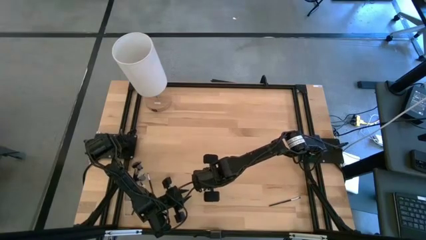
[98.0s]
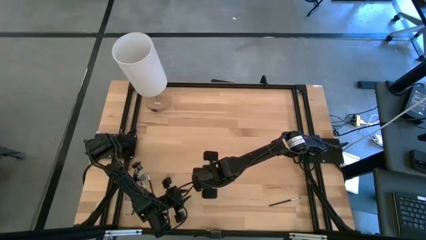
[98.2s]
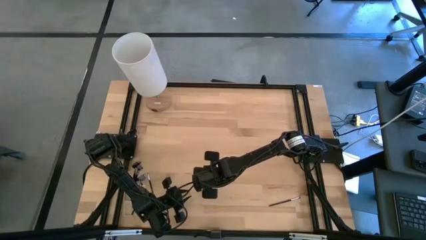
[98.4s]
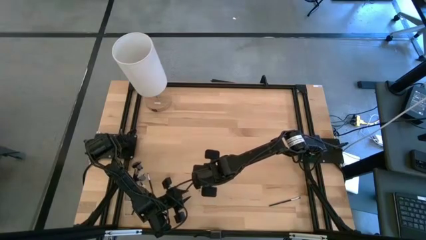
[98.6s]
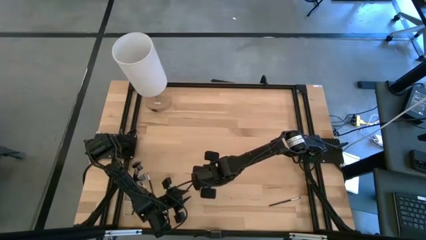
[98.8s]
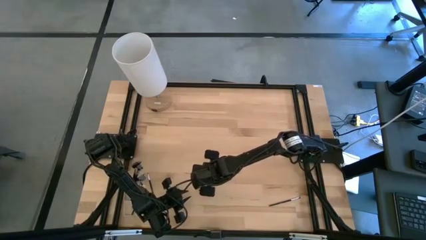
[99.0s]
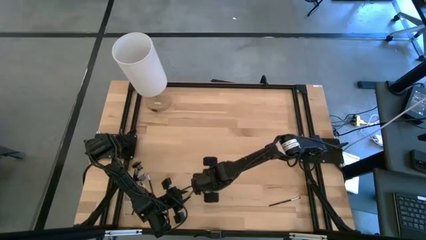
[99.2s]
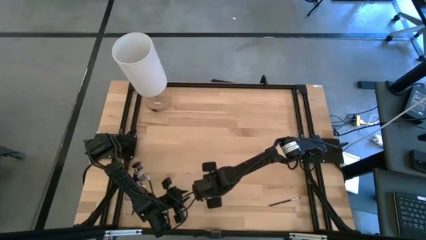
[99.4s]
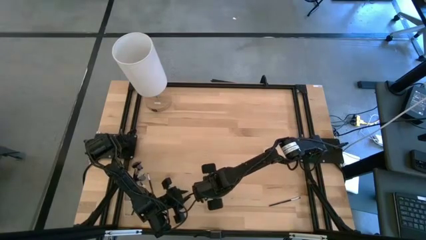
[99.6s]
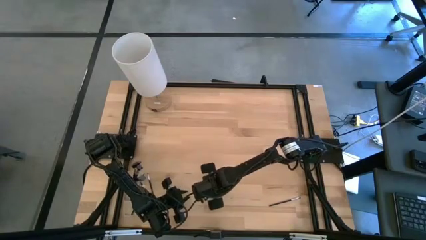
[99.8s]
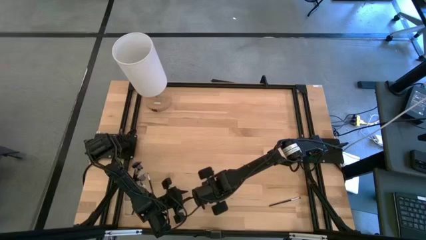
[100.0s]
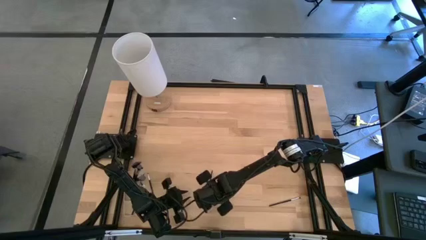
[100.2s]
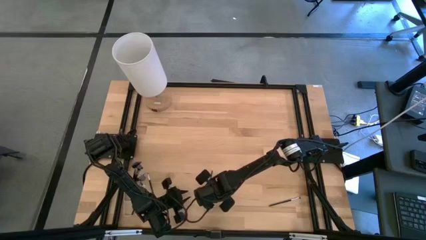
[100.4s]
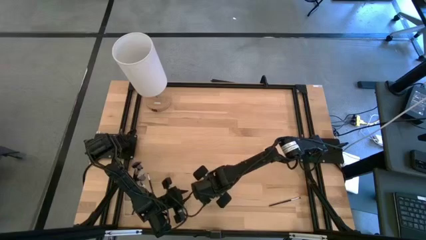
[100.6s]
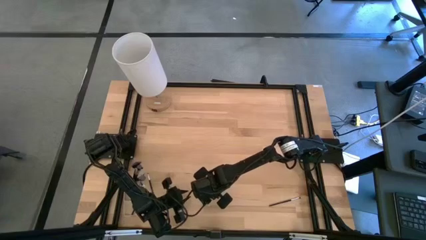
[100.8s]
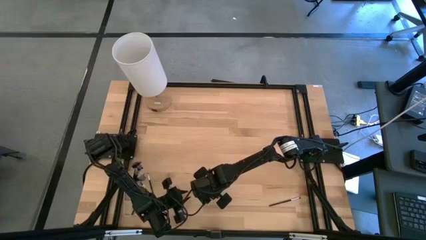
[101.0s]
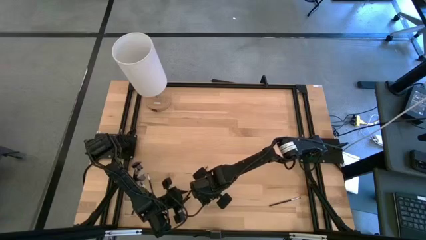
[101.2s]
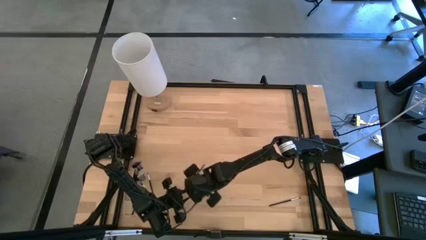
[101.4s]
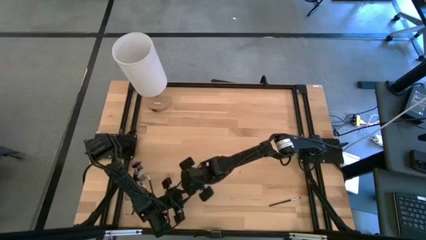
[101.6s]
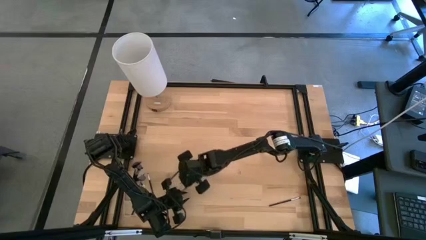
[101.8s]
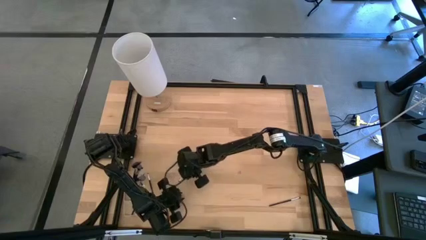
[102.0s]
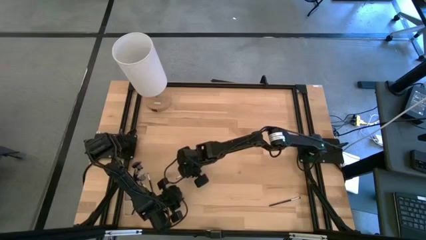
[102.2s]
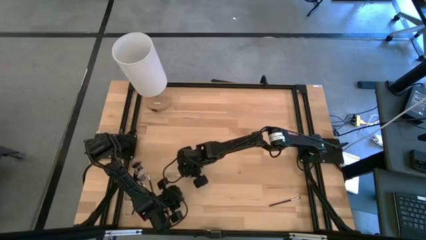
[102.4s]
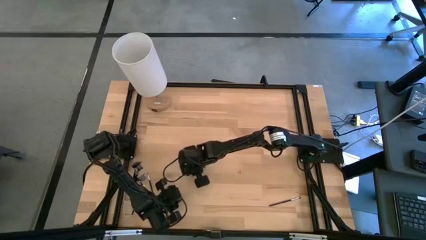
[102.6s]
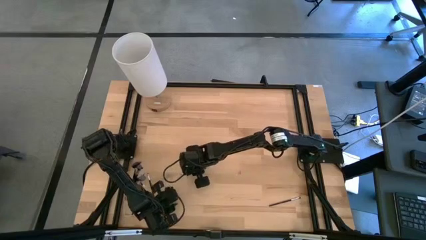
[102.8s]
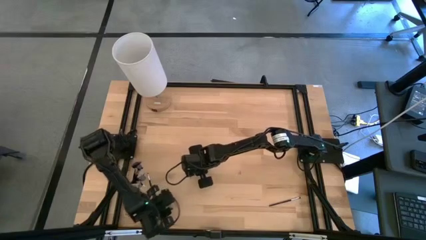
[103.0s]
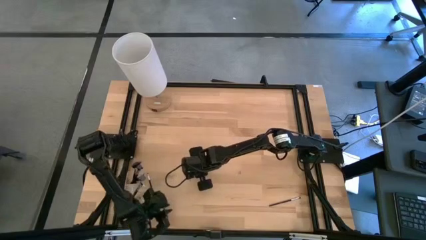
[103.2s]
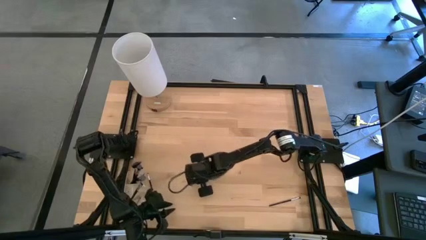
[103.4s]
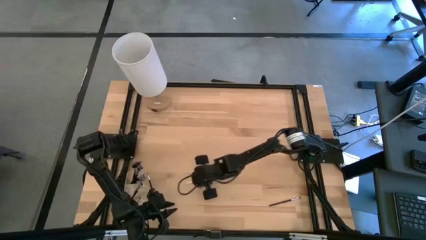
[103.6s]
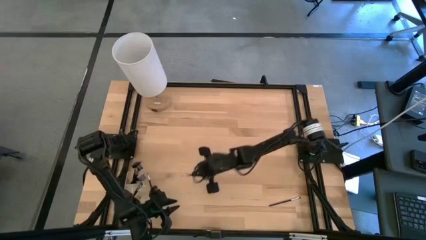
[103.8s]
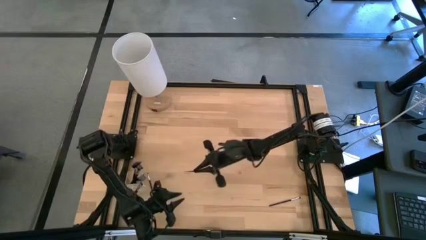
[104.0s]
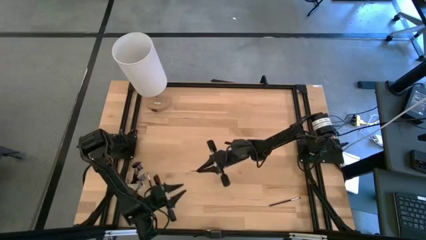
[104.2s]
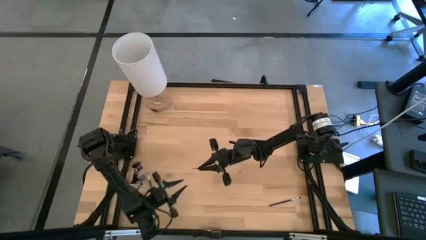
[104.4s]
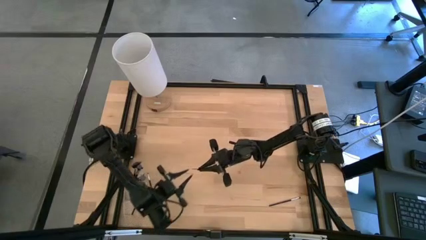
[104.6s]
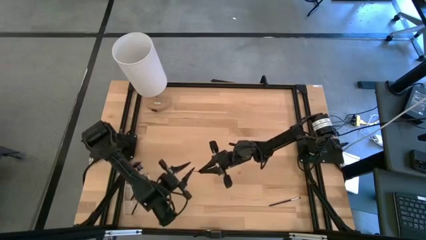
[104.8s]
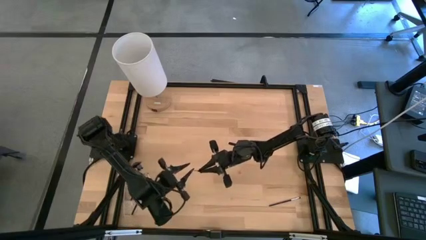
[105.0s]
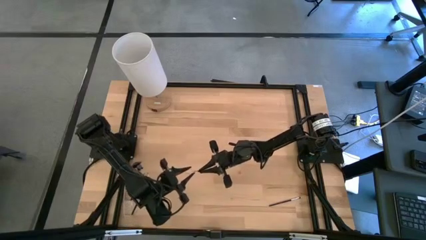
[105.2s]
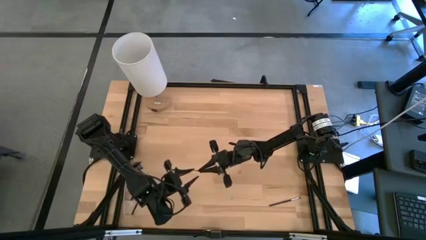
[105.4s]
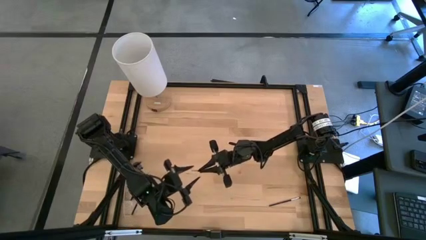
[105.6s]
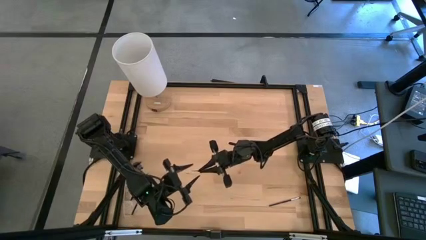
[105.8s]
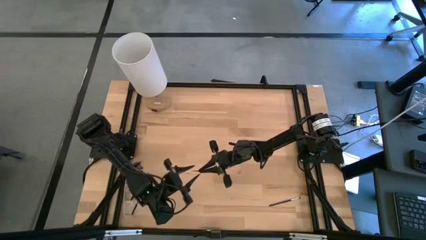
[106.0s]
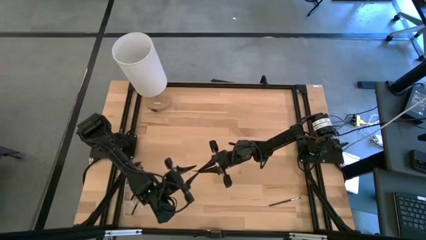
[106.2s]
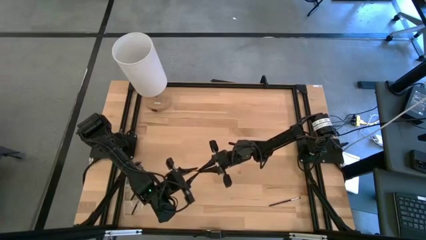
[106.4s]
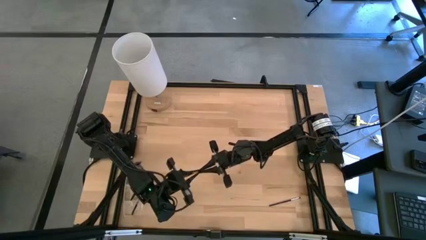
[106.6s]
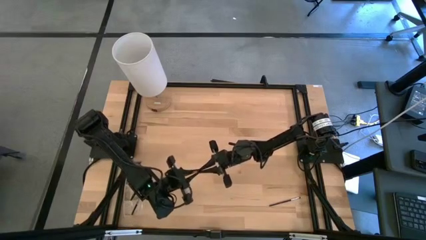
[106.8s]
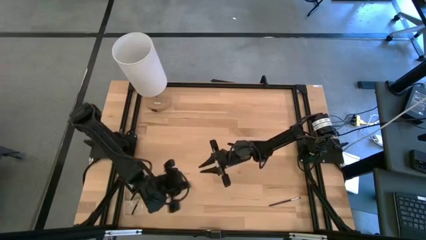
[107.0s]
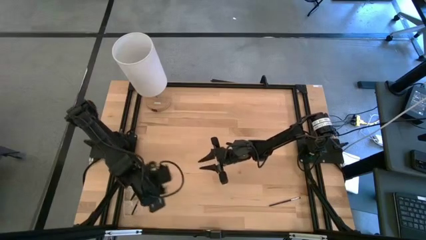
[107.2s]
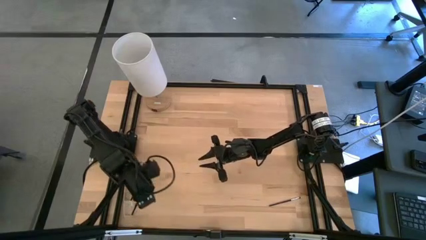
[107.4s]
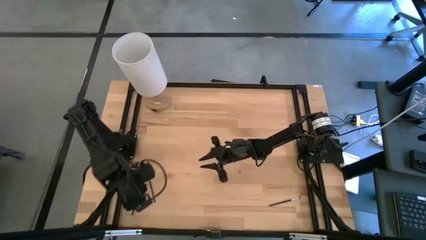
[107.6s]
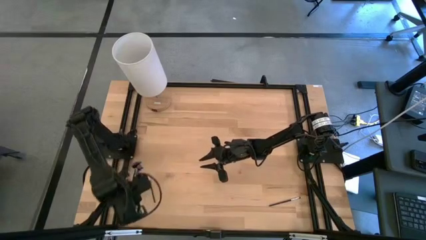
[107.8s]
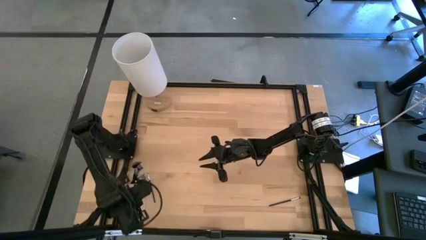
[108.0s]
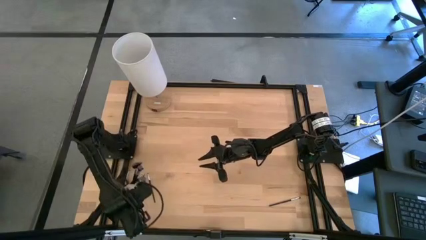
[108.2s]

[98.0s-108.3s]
Task: Pick & Place Makeup Supplies
Put the top makeup brush into the transparent organizer
